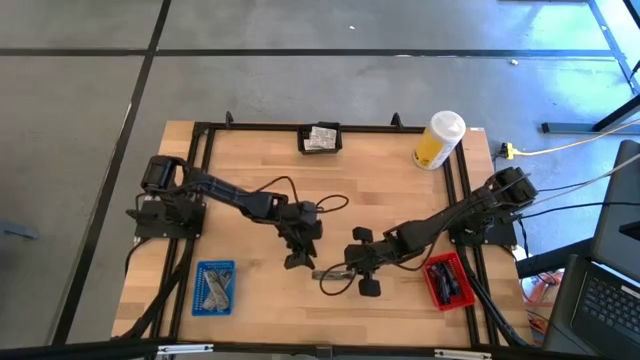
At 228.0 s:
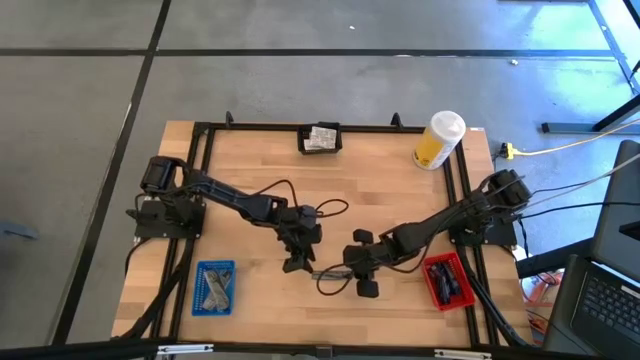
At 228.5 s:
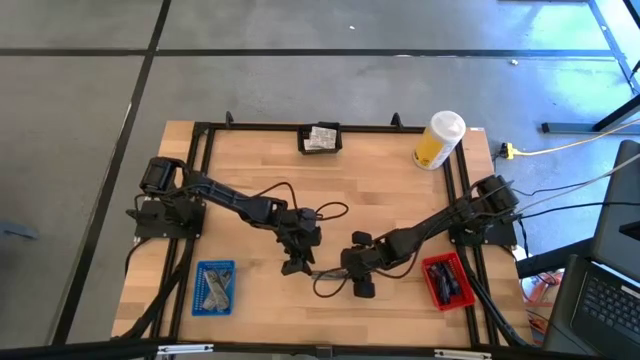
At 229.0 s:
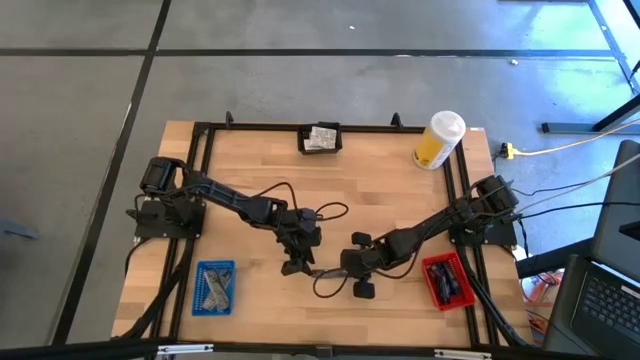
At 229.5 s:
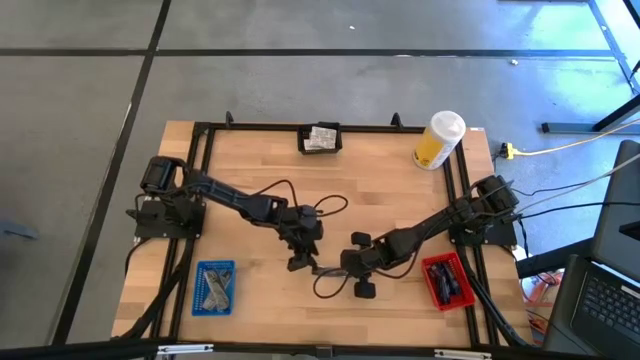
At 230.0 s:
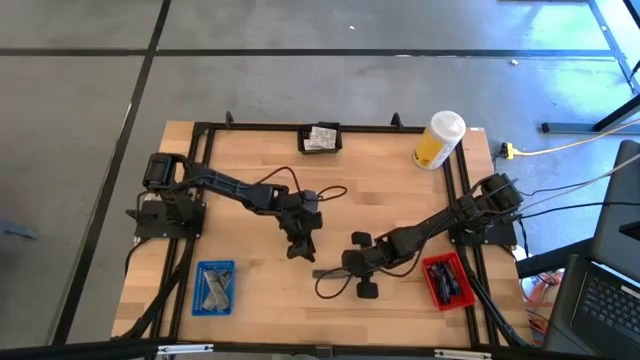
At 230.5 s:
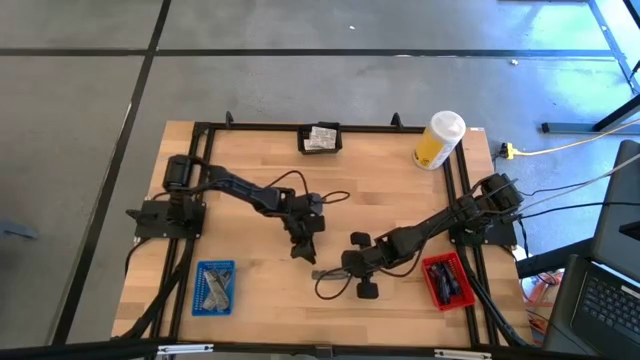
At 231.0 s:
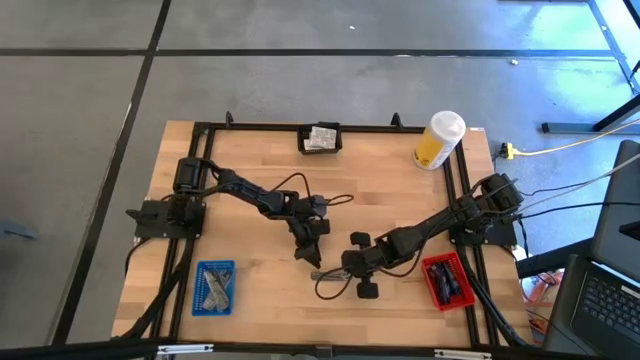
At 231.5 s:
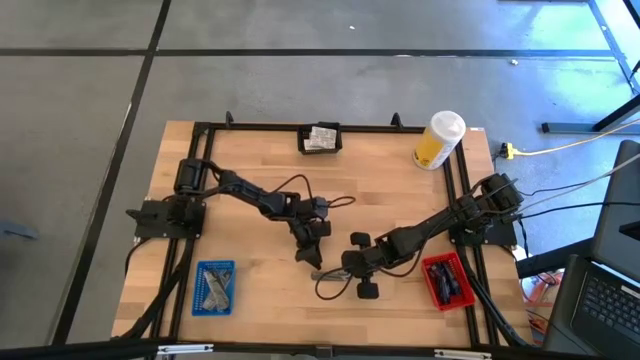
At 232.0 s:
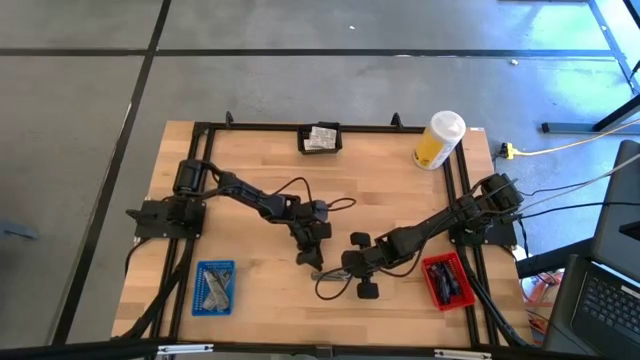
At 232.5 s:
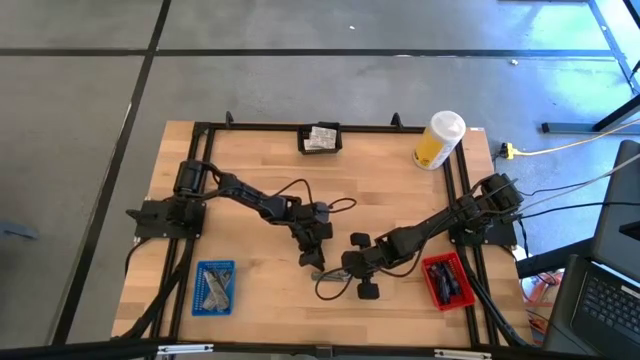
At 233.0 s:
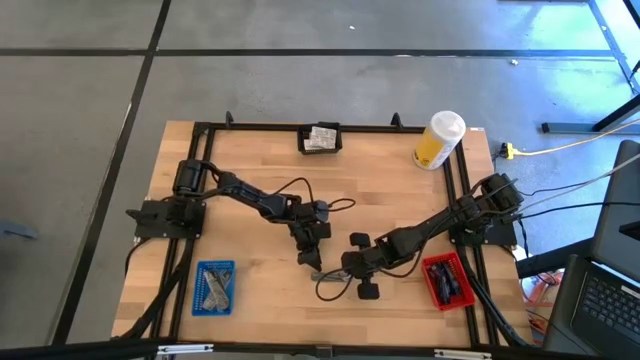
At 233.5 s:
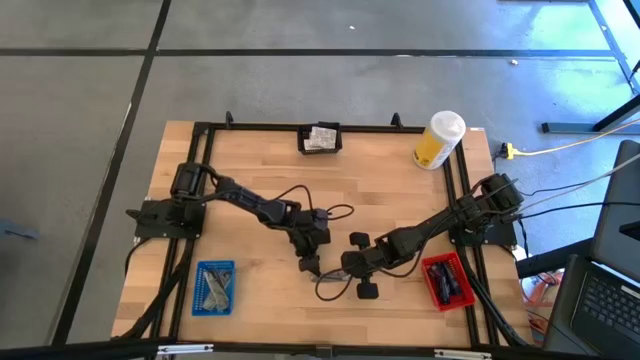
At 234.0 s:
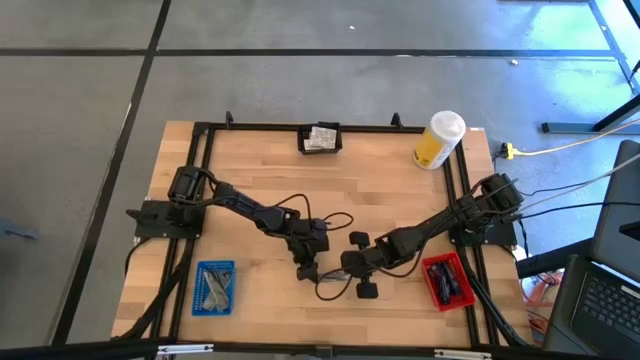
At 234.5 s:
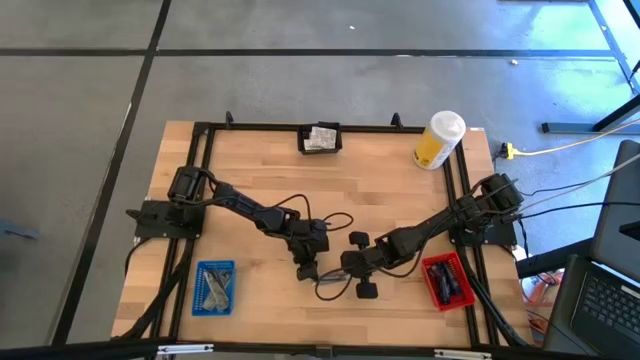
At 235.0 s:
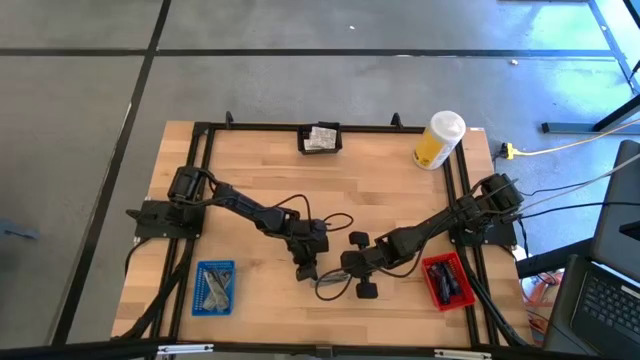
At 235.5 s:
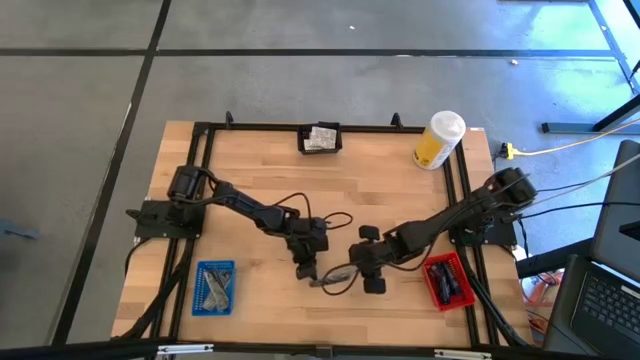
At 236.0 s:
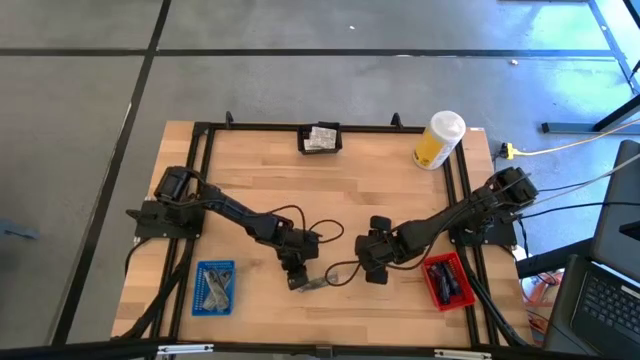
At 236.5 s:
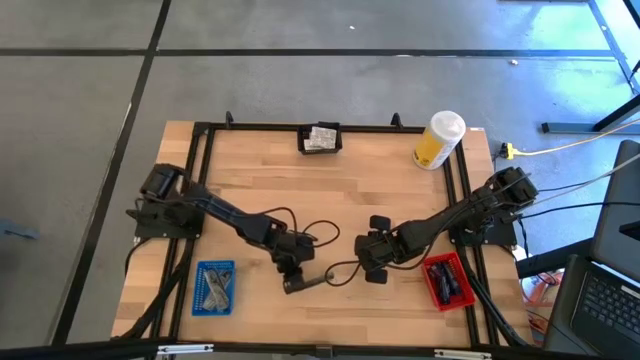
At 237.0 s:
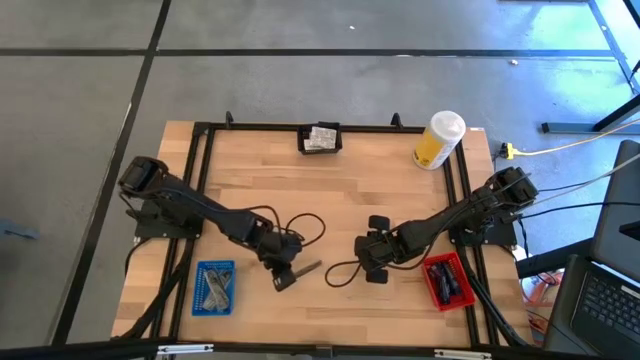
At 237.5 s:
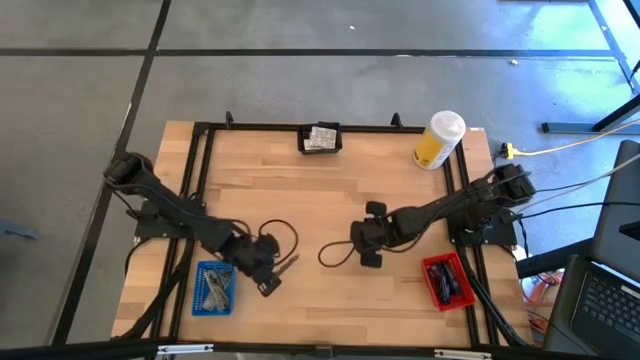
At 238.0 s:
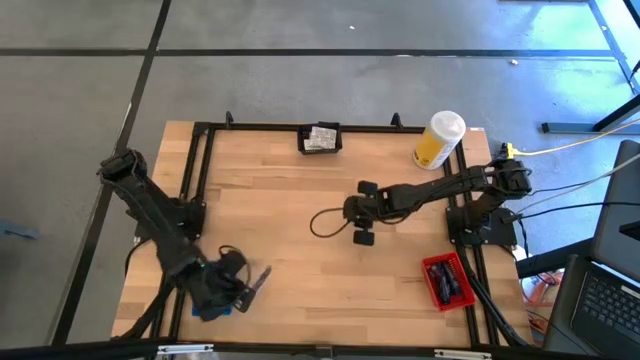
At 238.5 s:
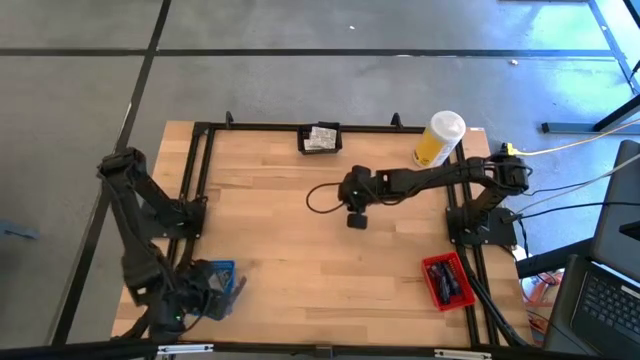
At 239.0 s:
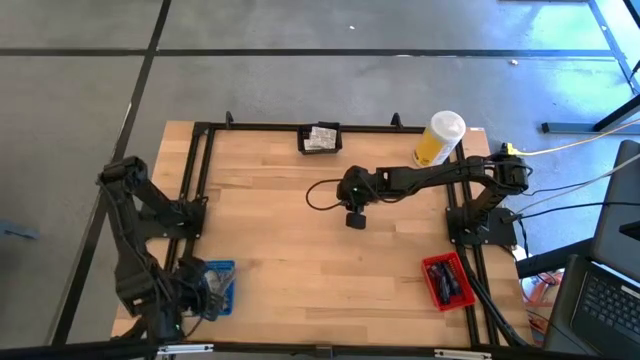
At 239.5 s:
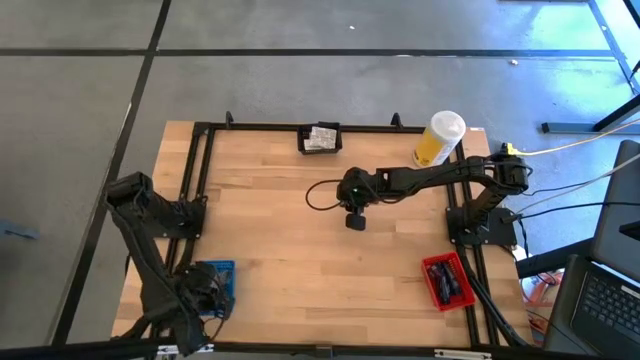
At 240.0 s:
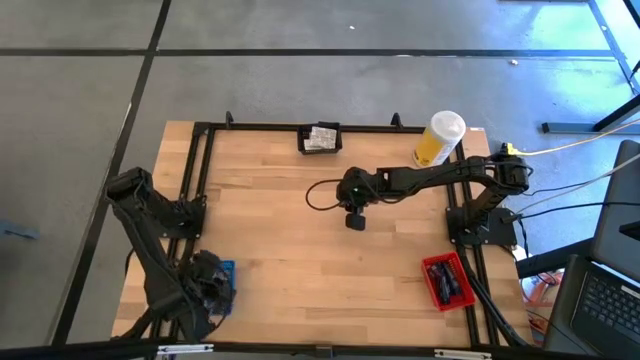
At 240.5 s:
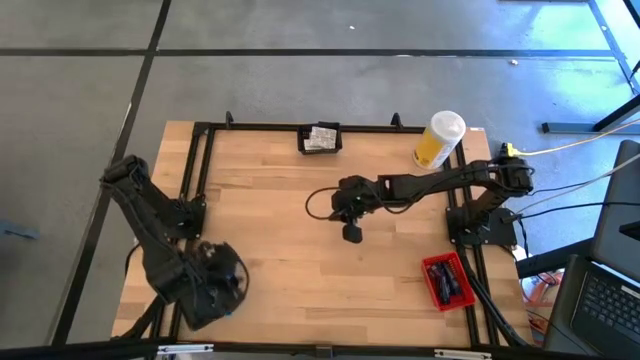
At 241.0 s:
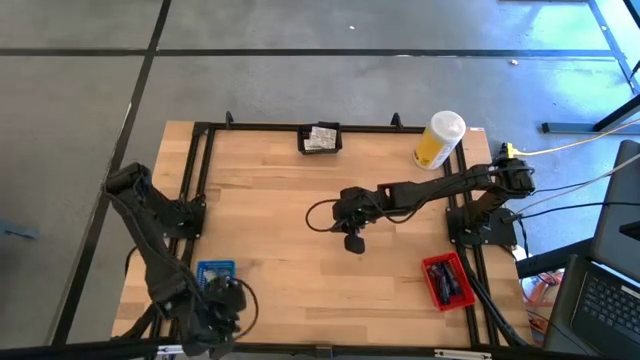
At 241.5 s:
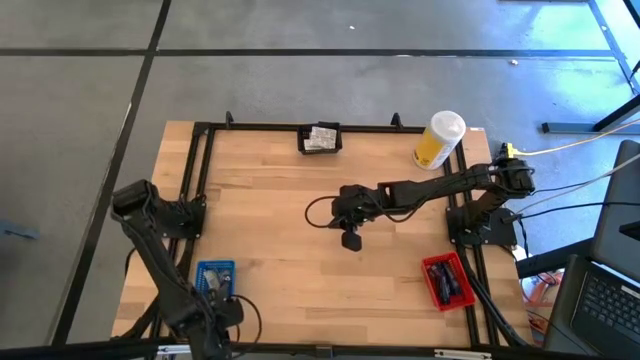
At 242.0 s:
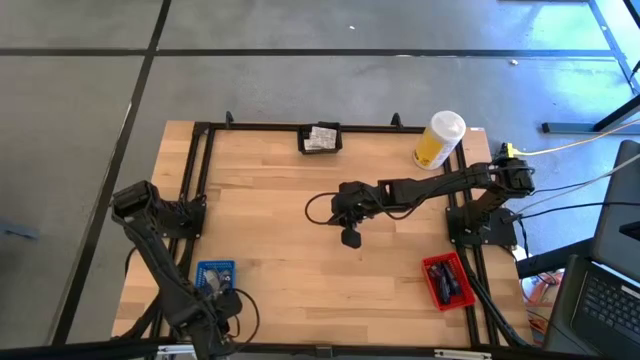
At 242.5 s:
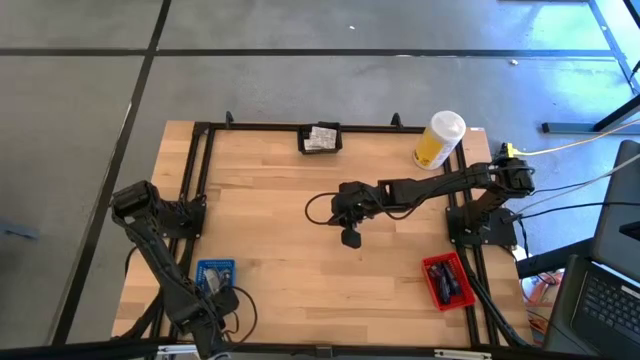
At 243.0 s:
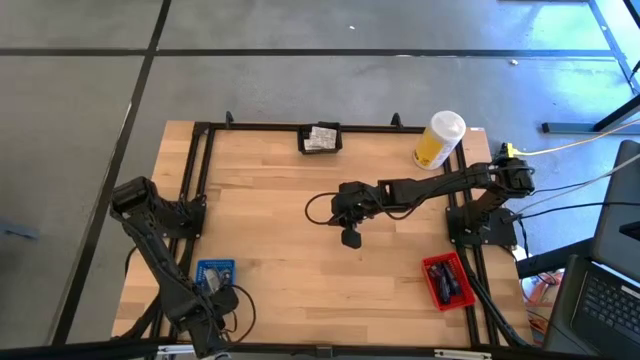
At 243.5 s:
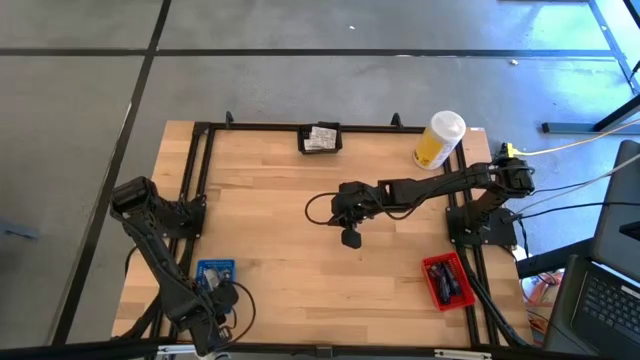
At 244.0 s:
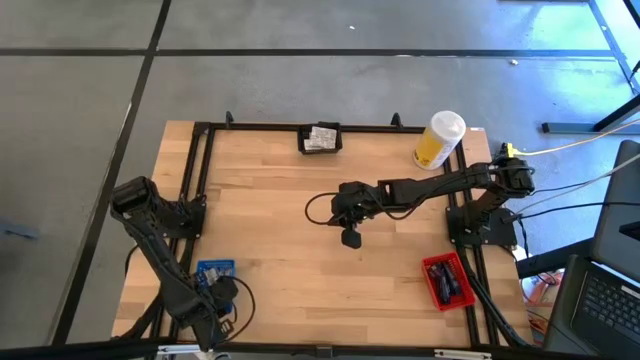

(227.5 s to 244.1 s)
Task: Pick & Place Travel size toiletries
Put the black comb into the blue bin

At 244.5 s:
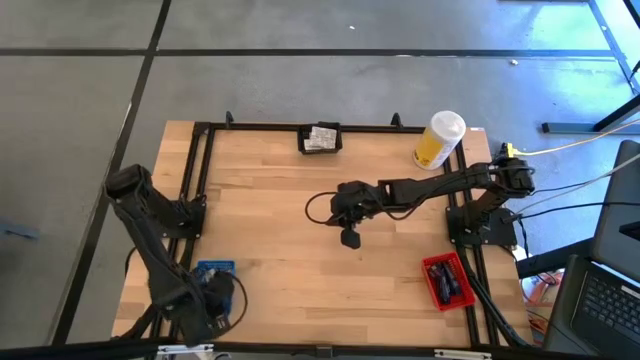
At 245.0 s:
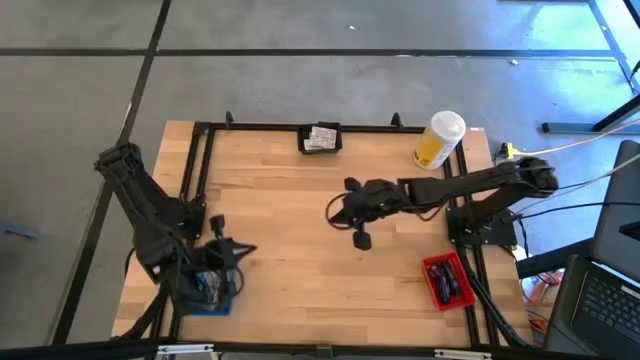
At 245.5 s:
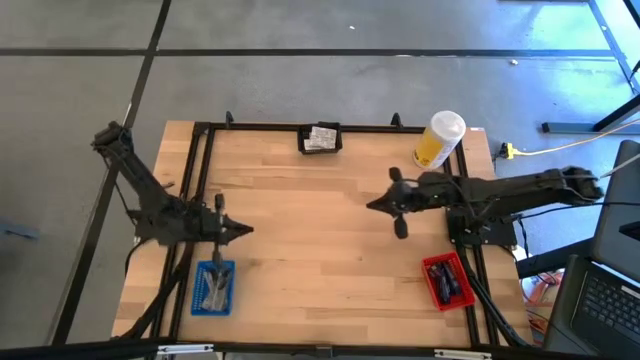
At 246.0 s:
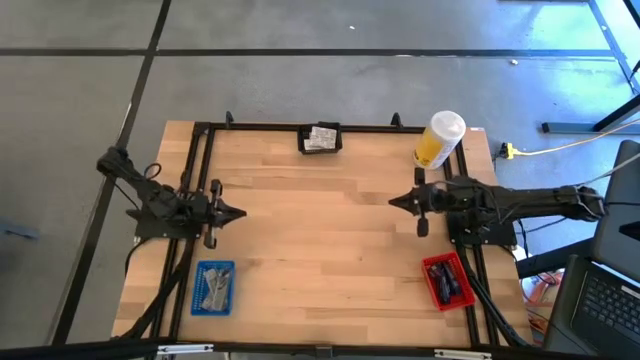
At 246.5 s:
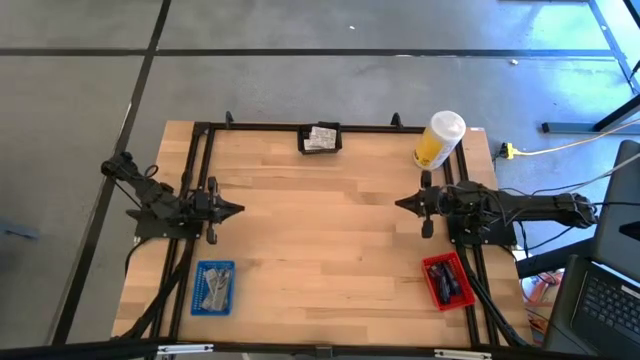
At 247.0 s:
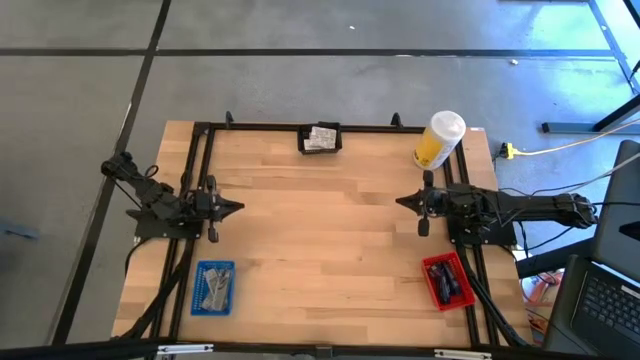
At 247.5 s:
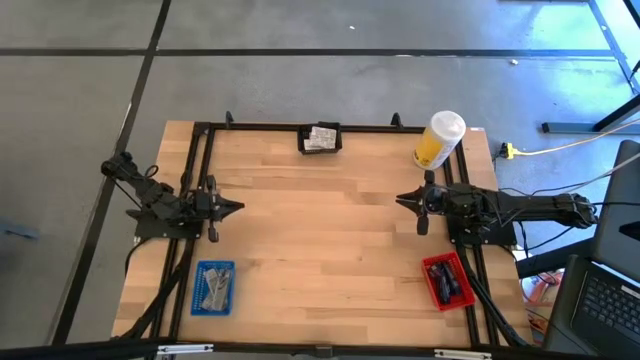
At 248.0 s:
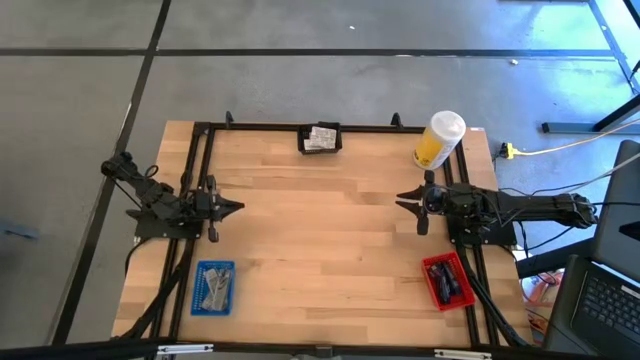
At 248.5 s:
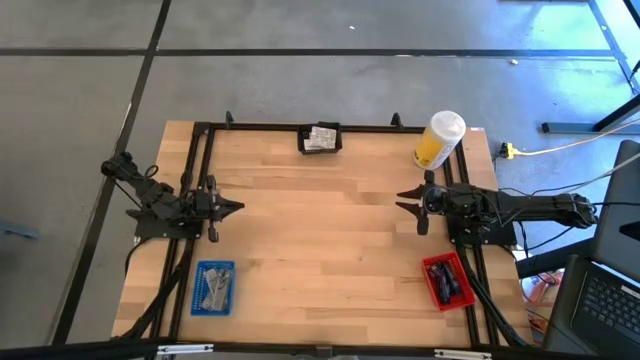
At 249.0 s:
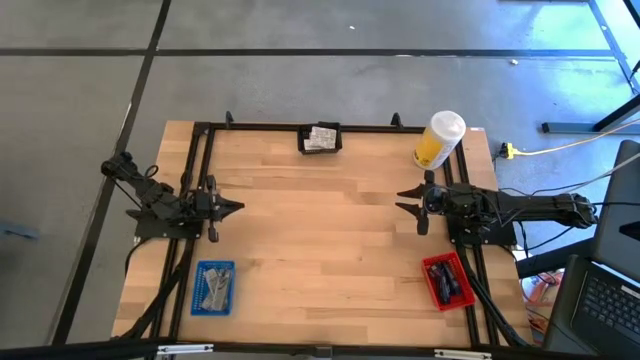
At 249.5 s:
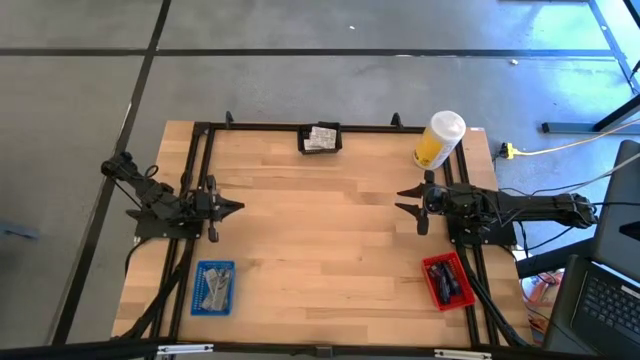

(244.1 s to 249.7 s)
Return to Home Position
